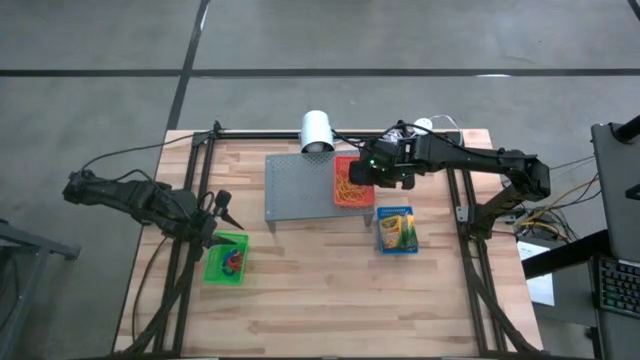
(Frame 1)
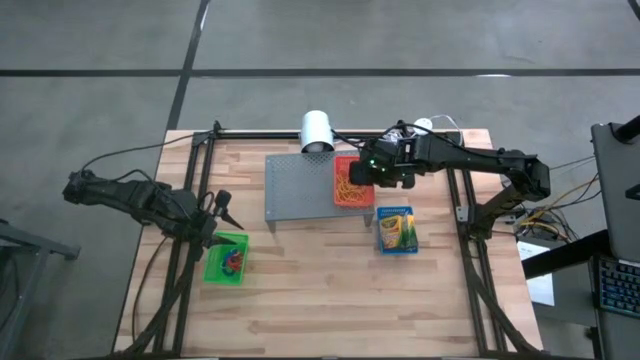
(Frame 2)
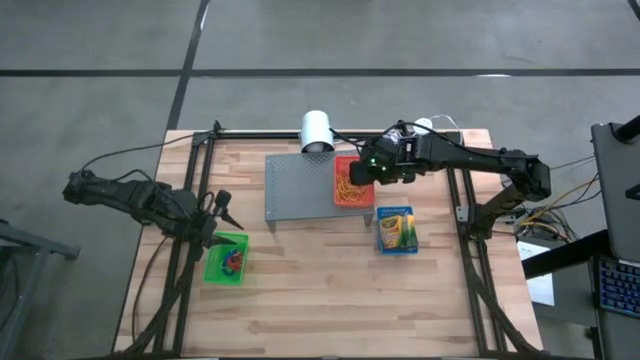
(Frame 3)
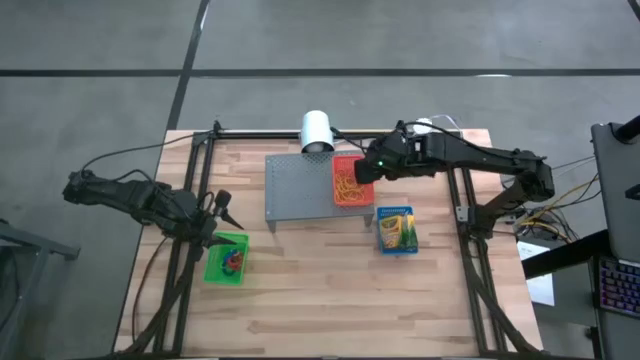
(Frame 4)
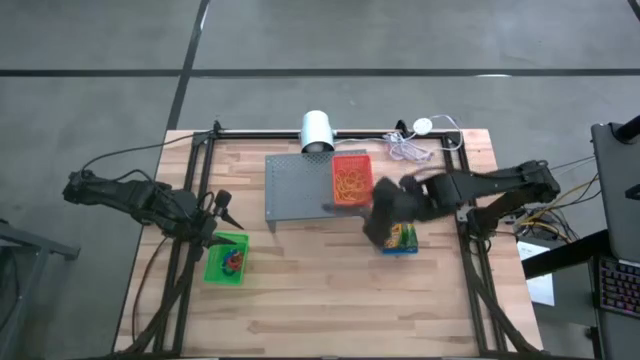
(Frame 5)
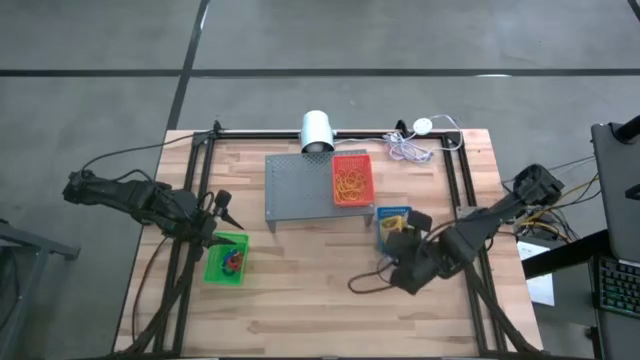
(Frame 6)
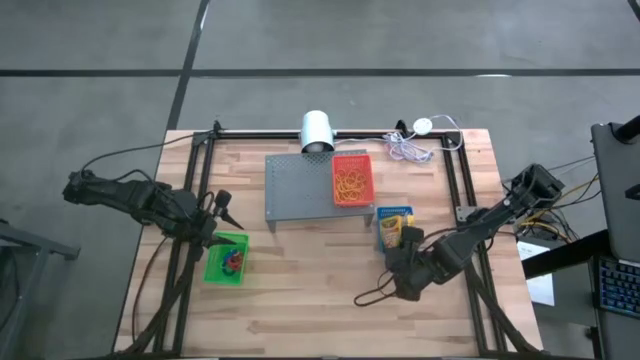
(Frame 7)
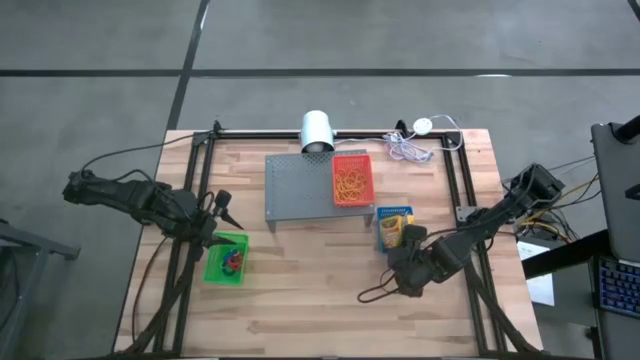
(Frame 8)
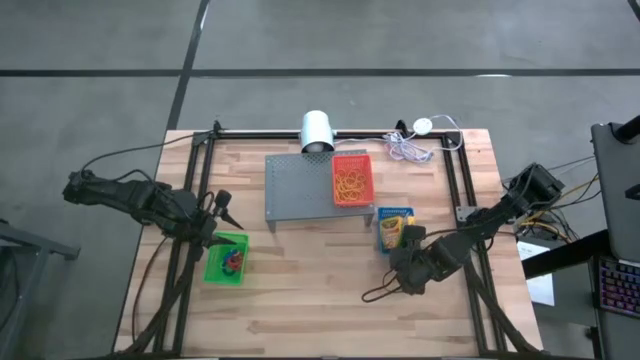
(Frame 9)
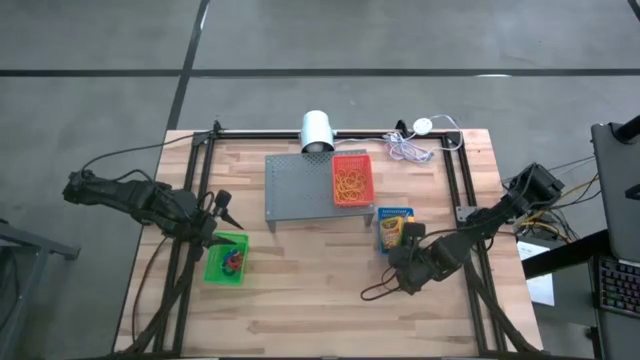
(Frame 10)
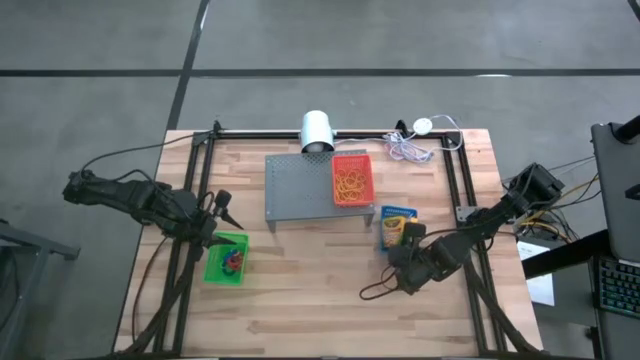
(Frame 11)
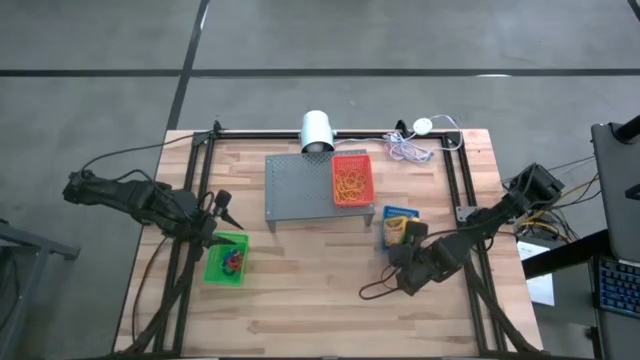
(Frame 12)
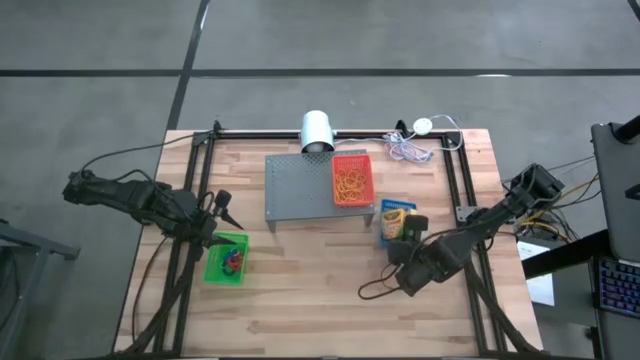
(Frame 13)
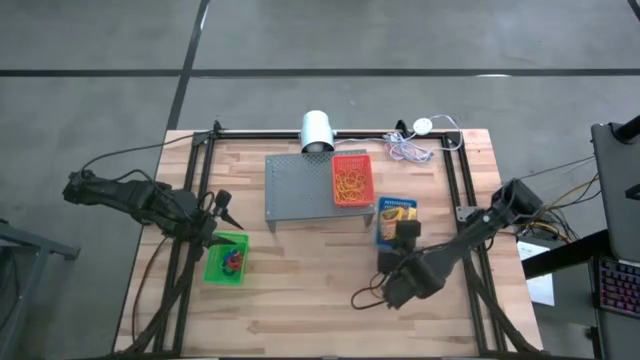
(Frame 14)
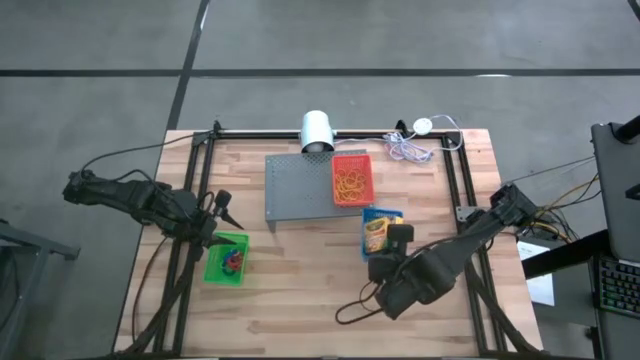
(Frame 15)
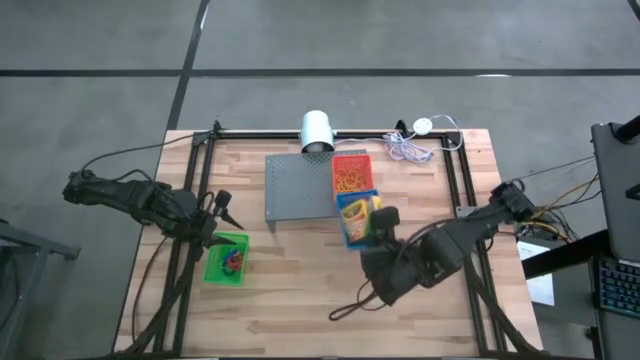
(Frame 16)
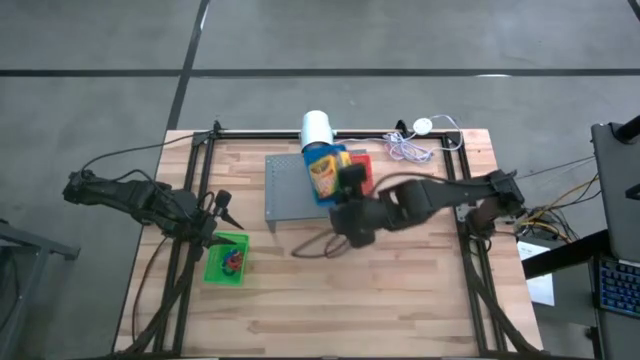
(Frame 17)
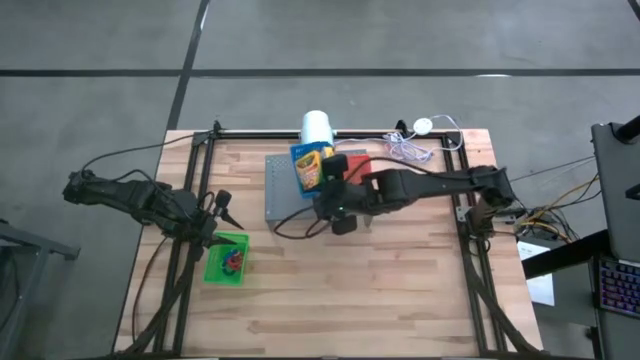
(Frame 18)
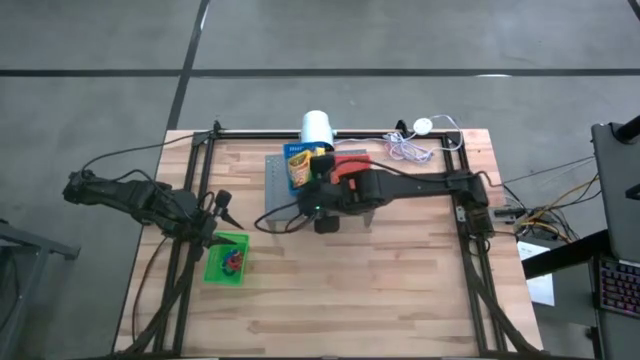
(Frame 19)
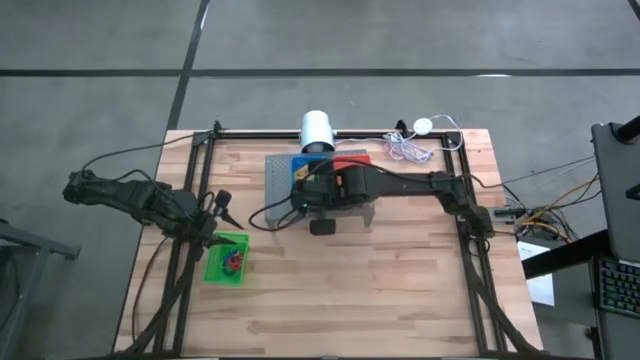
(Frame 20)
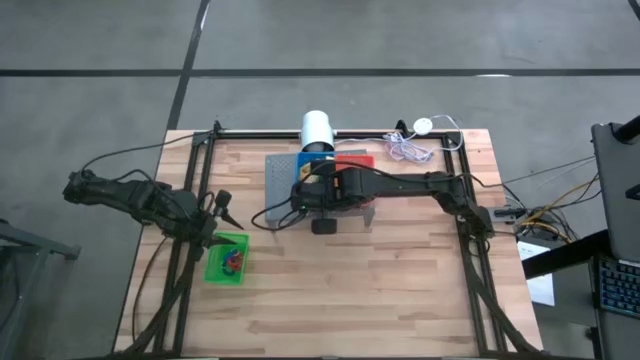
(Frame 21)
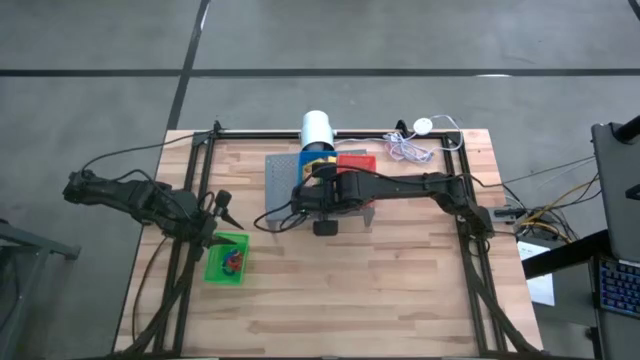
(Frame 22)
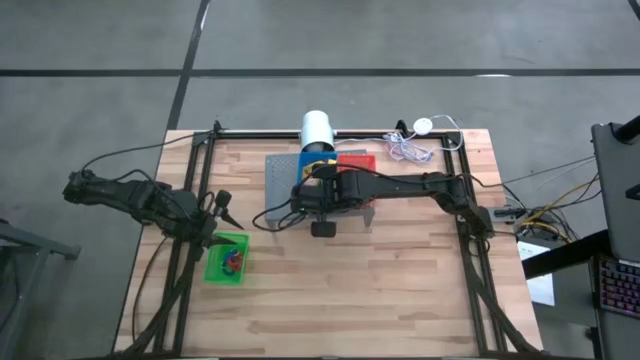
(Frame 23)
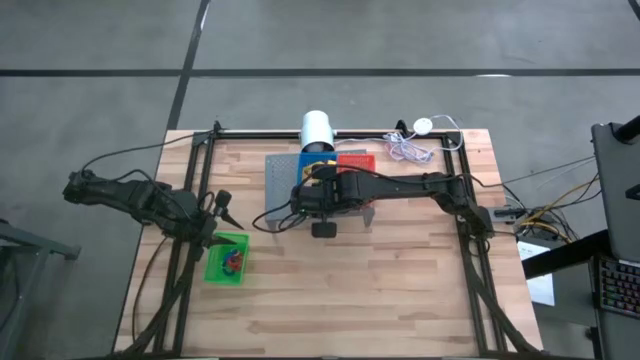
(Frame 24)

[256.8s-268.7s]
Task: Pick & Place Office Desk Supplies
Put the yellow crayons into the blue bin on the shelf

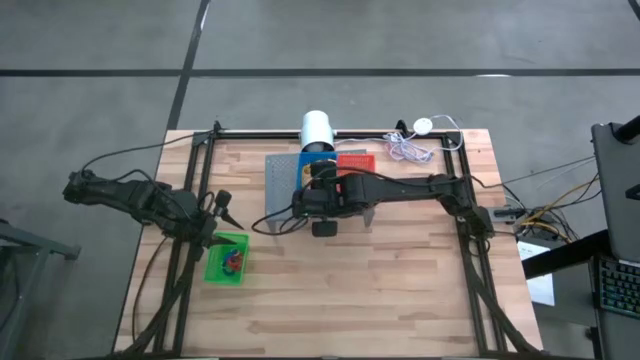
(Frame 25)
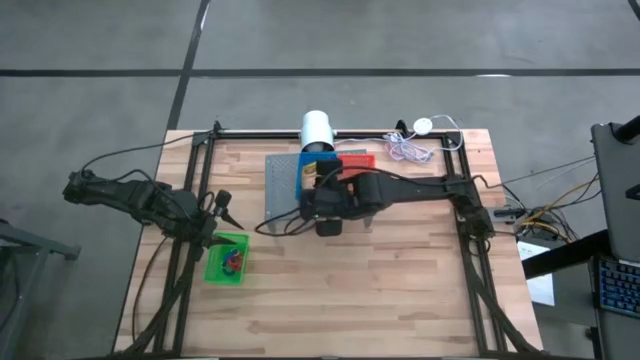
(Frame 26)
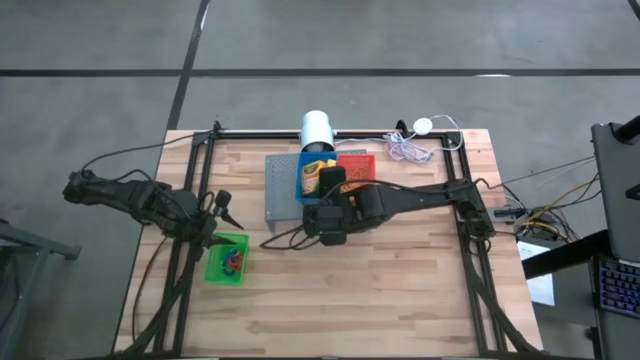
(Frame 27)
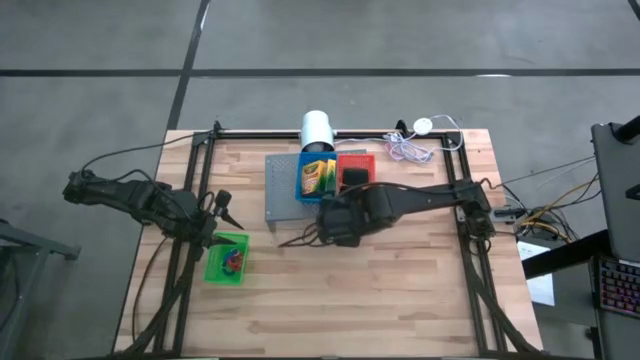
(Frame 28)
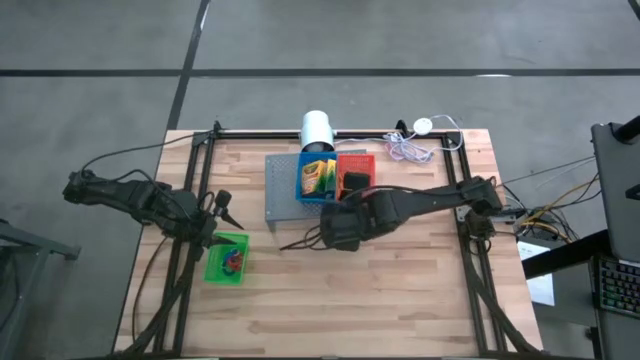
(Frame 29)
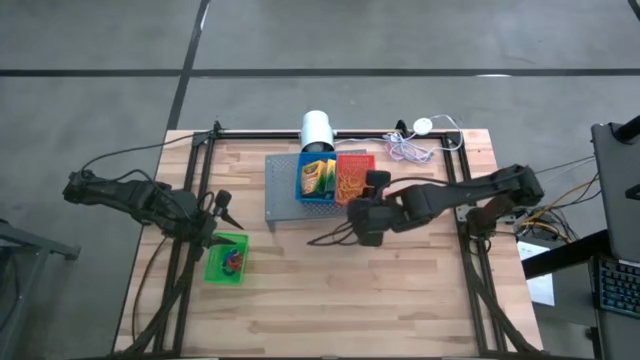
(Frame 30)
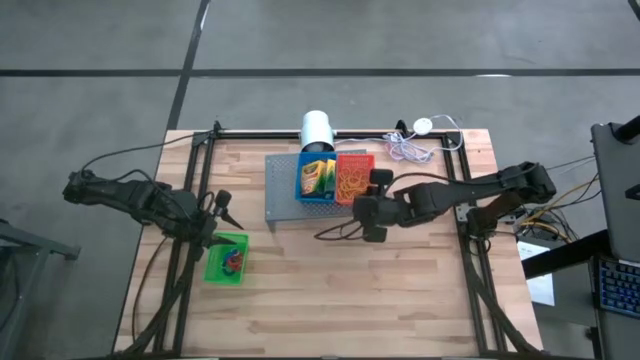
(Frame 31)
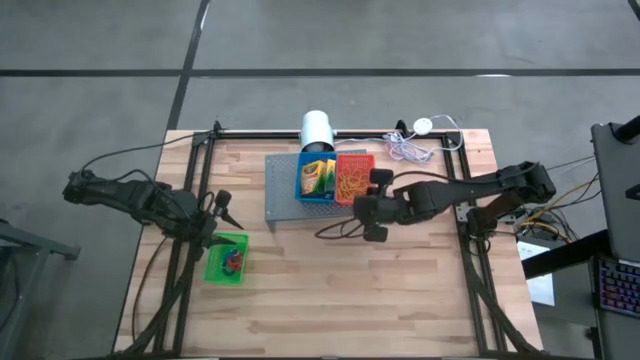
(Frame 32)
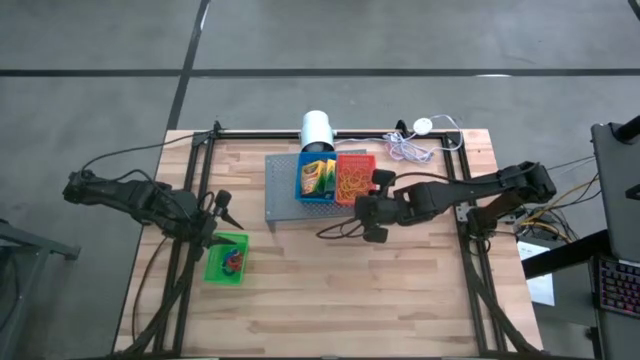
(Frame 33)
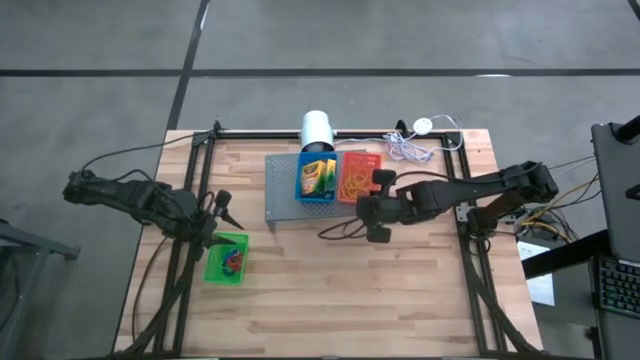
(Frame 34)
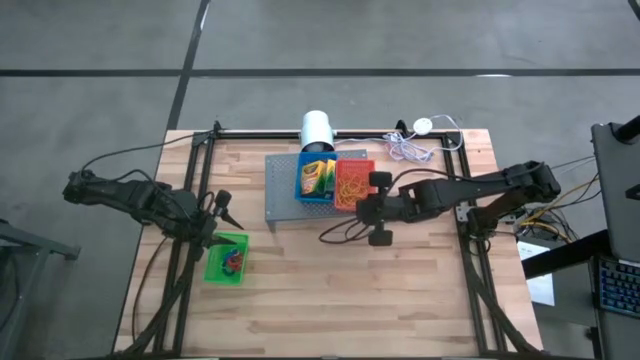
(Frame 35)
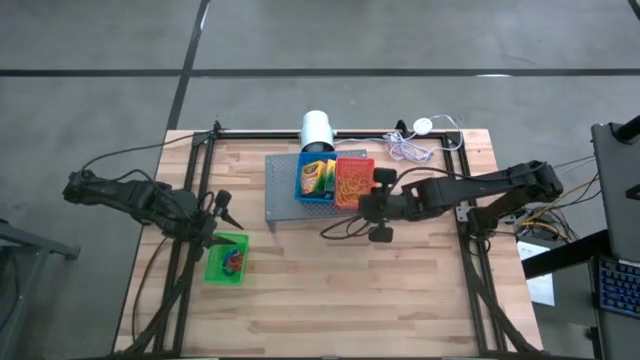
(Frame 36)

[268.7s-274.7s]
Adjust the orange bin on the shelf

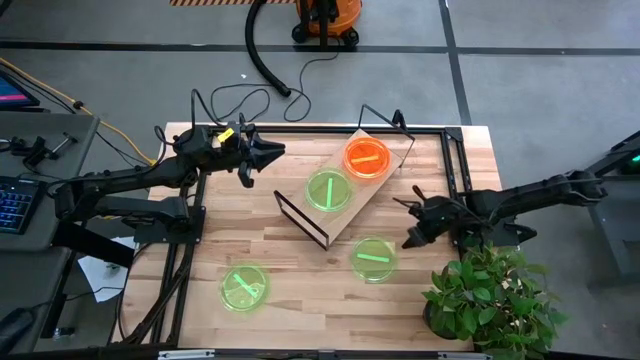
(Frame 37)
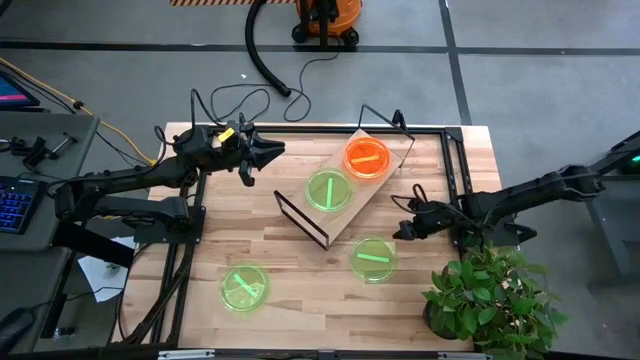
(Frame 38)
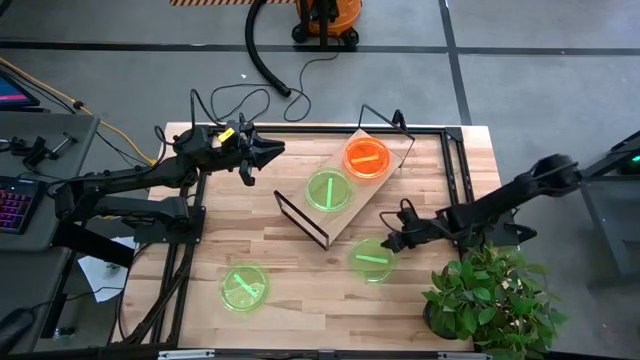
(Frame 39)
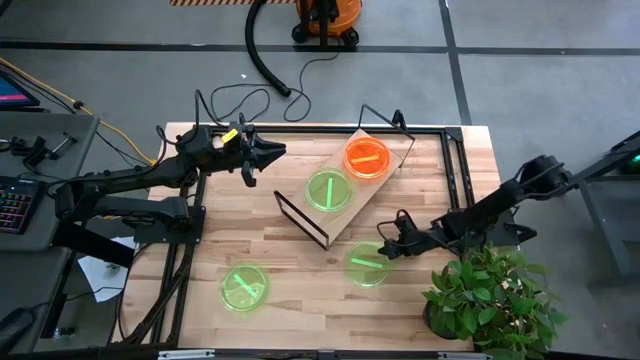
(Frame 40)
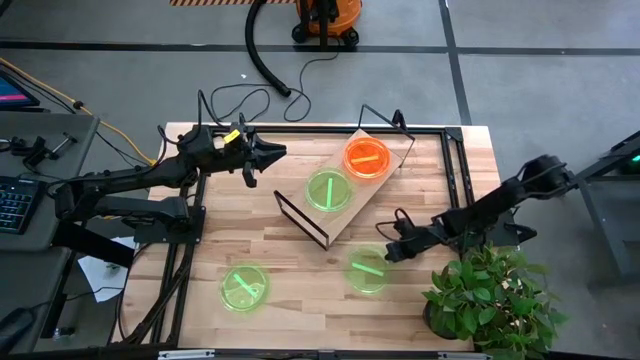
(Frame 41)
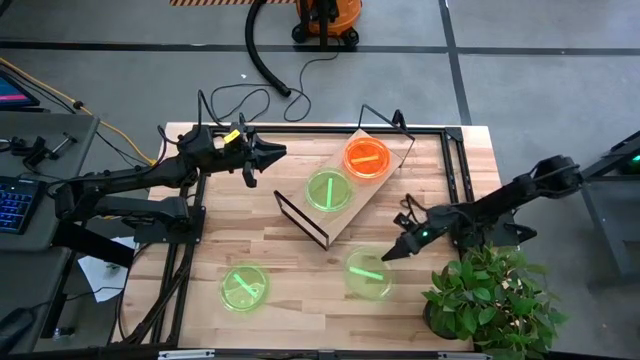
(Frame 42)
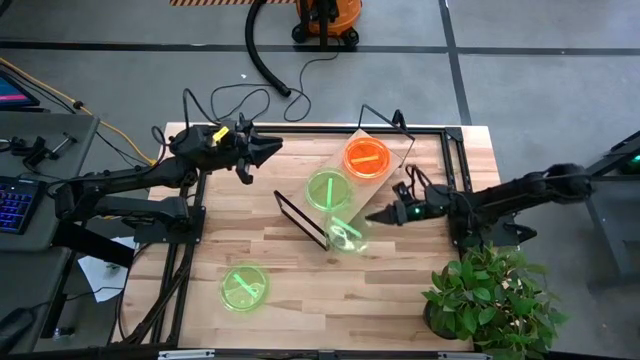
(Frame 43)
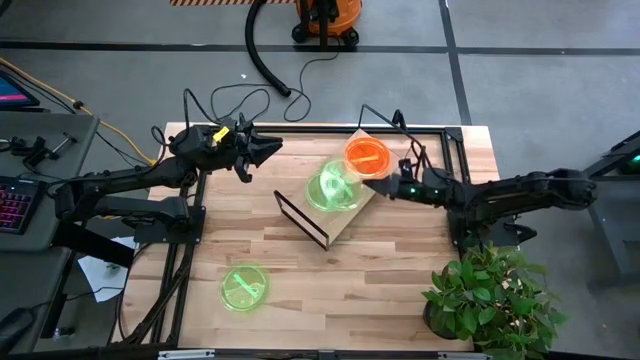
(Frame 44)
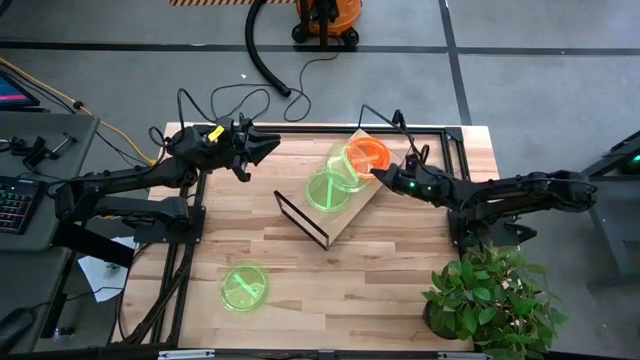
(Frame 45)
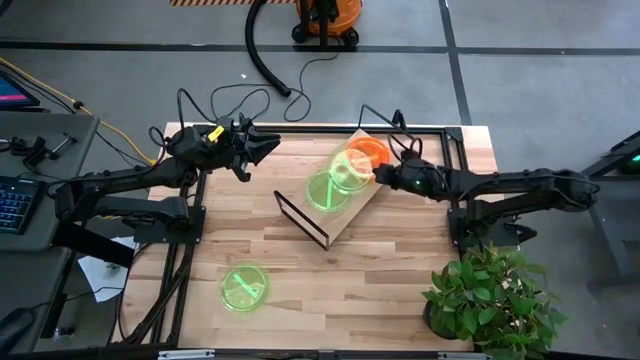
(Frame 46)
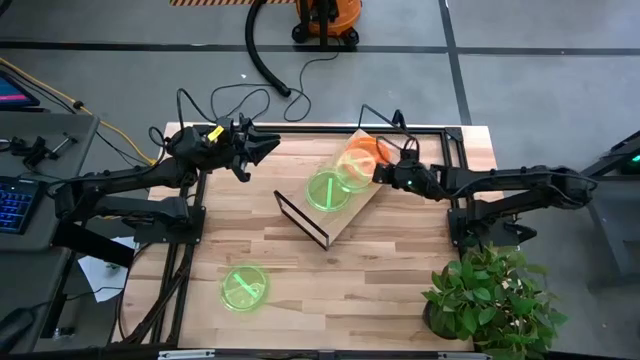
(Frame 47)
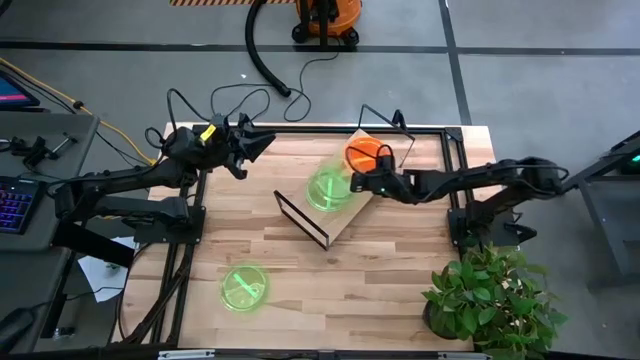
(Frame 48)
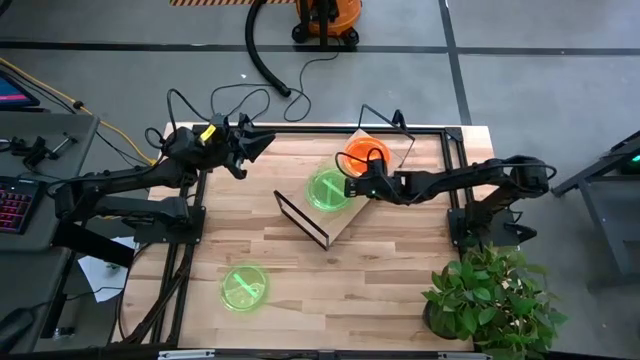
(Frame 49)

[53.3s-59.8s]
Task: Place and stack plates onto a shelf
Stack the right green plate on top of the green plate on the shelf
